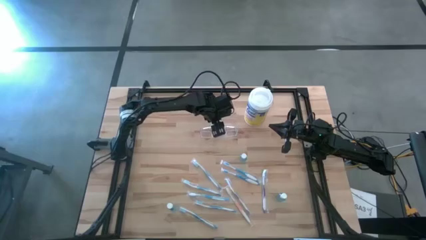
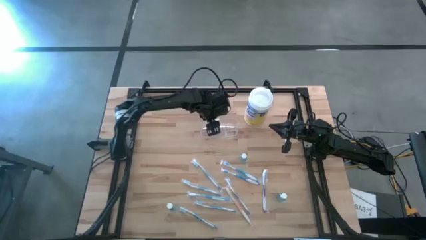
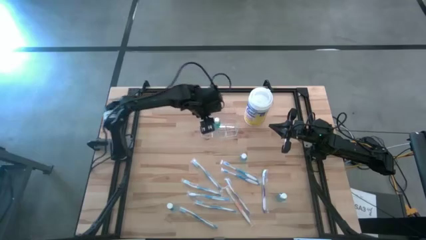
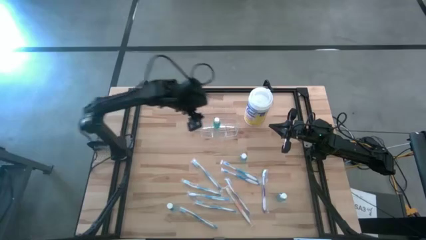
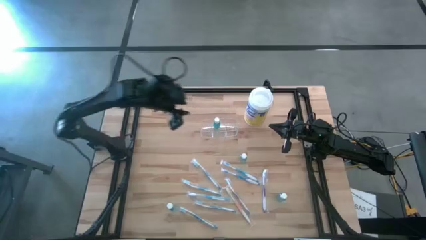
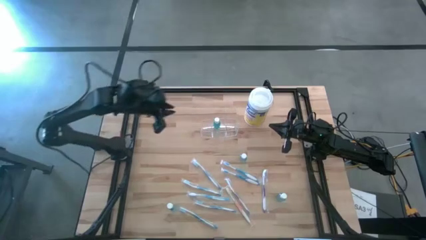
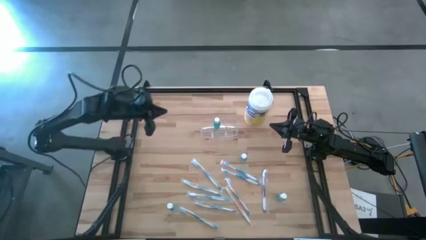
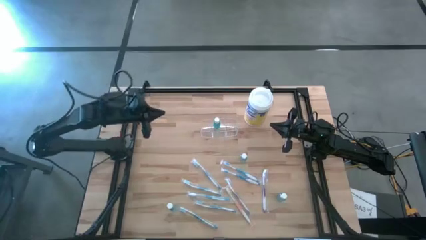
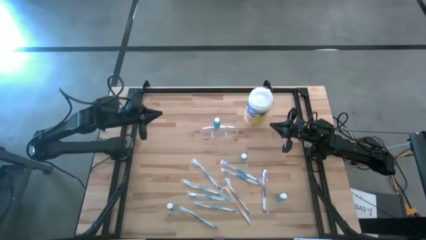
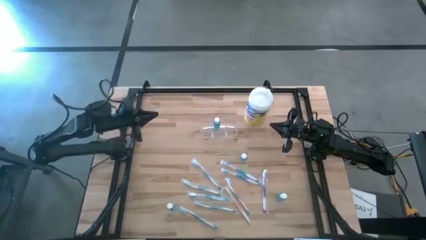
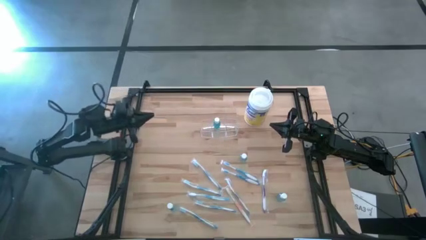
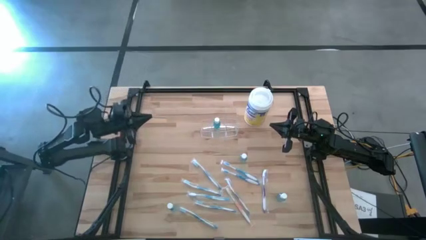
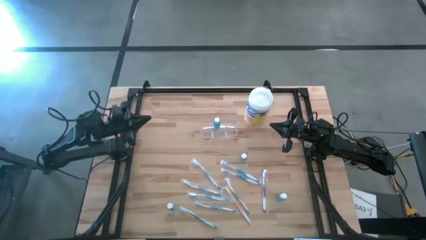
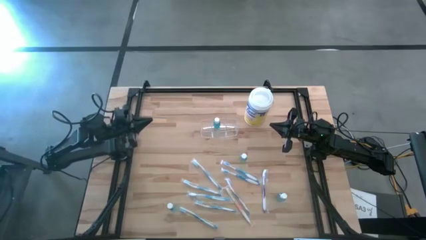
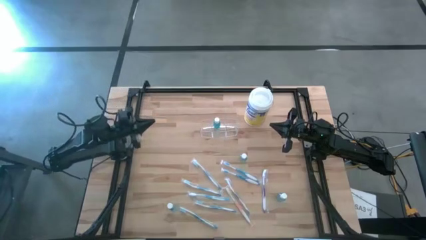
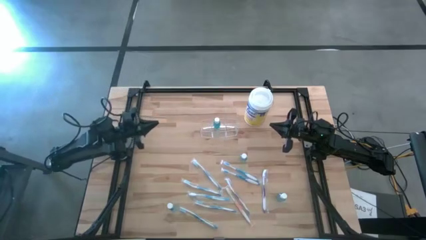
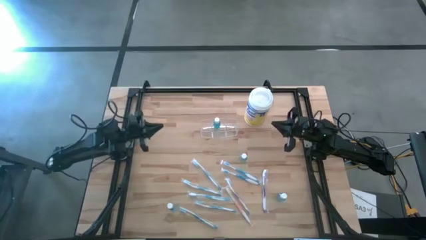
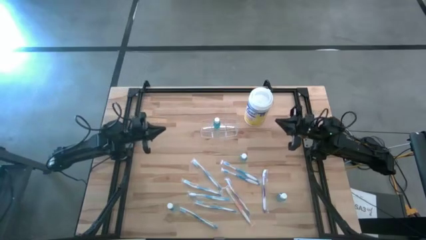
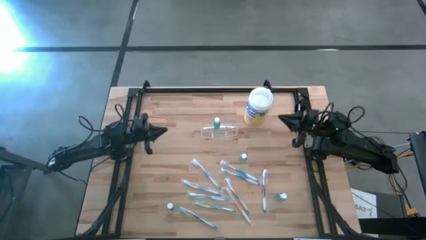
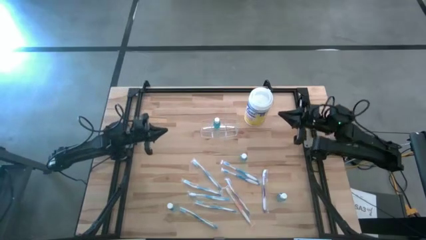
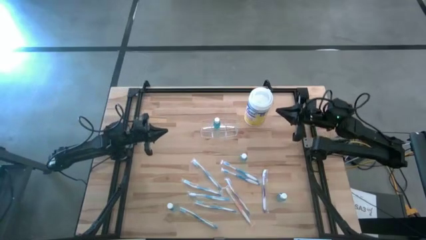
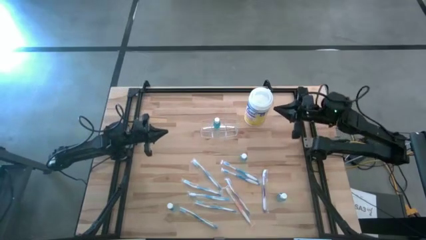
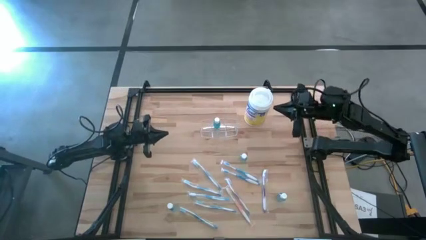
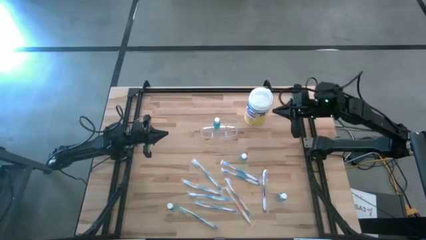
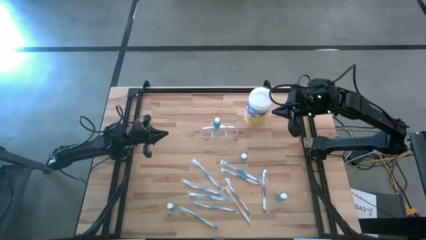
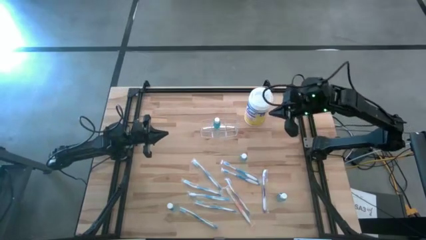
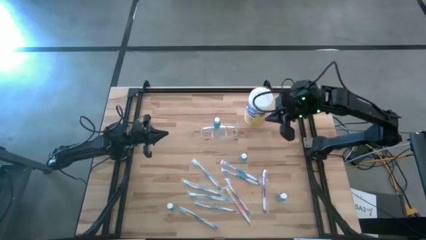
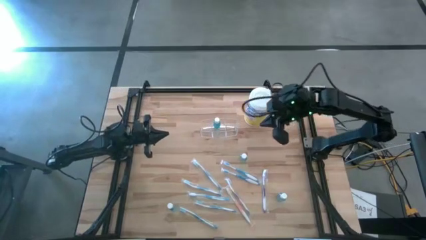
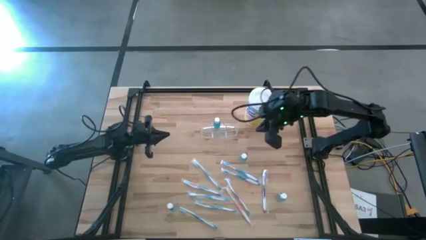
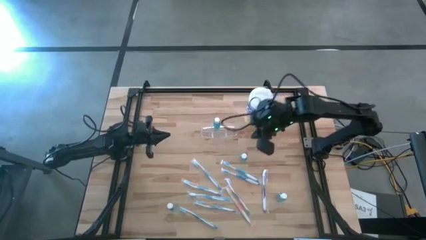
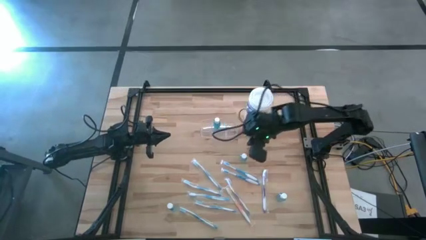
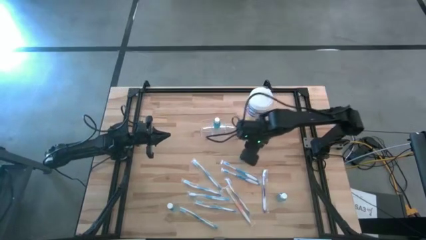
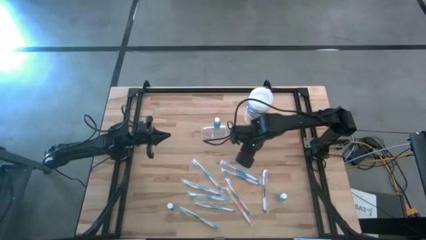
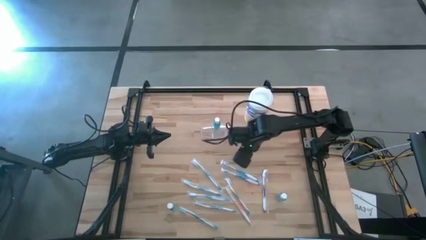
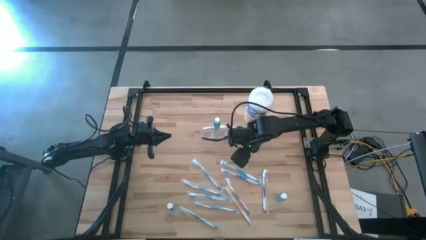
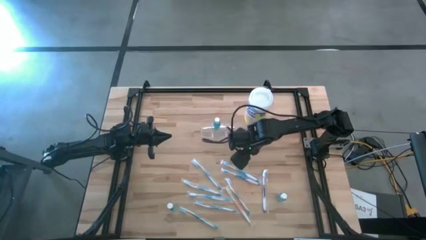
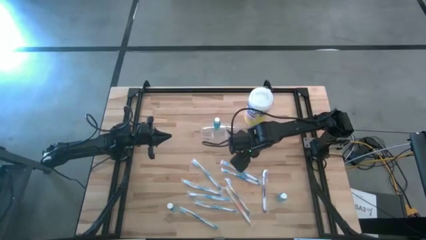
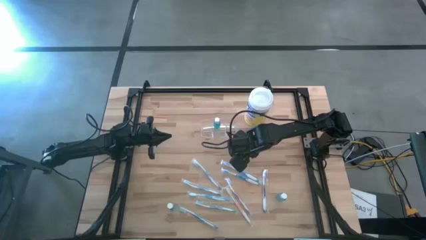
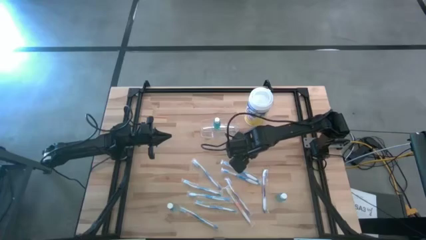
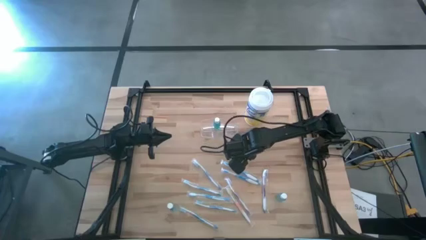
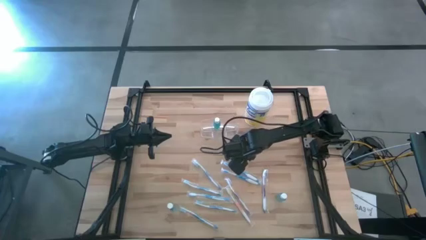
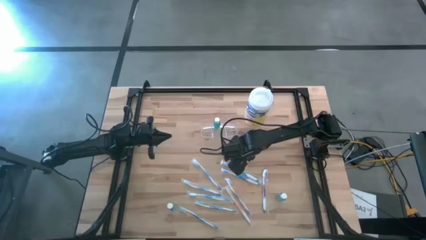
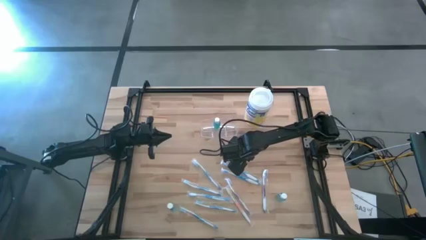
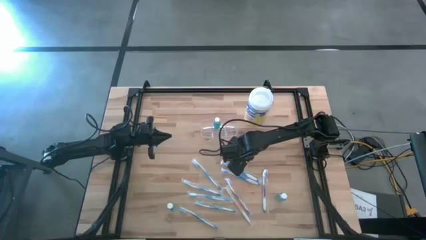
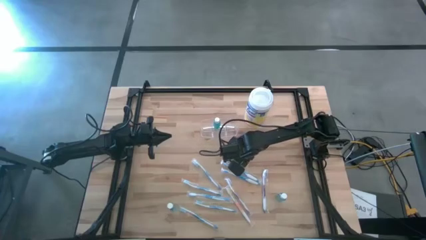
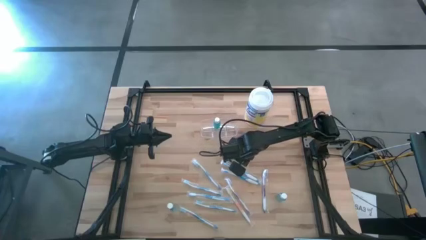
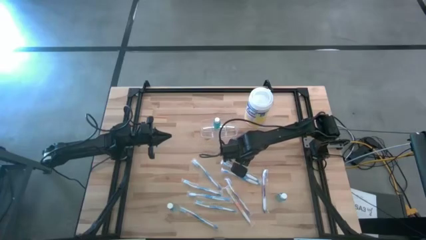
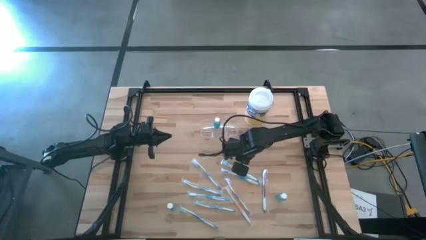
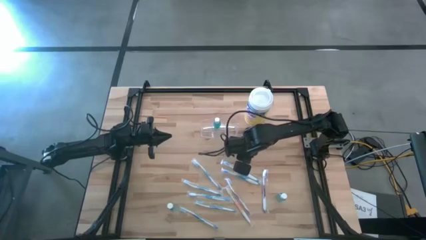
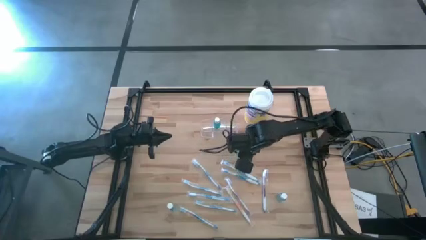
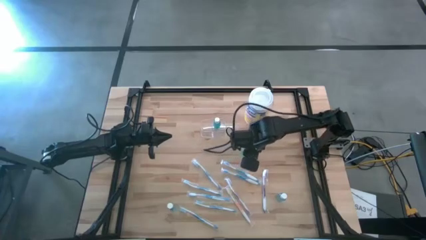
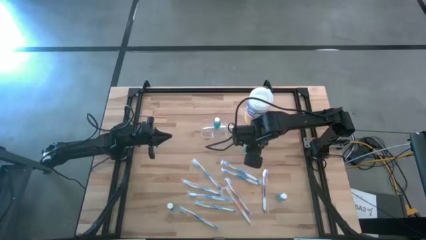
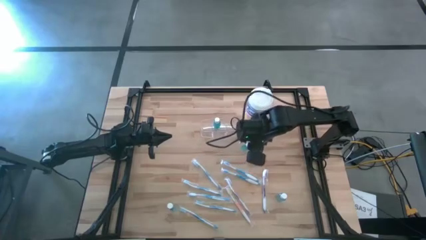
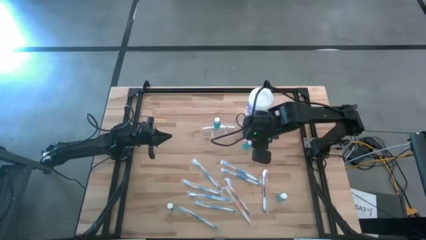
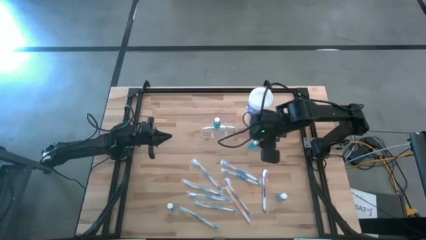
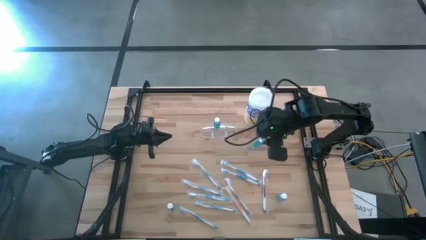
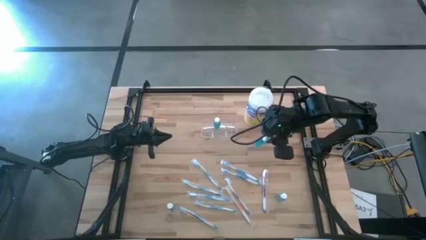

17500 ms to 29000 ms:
Task: Pick & Place toothbrushing station
Put the blue mouthwash into the transparent organizer
